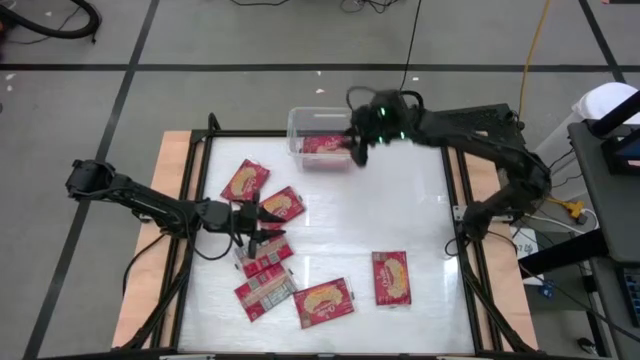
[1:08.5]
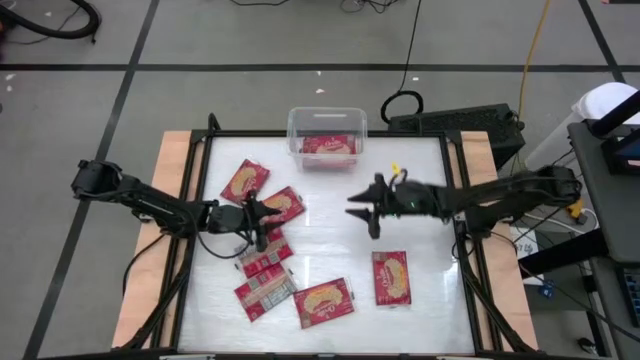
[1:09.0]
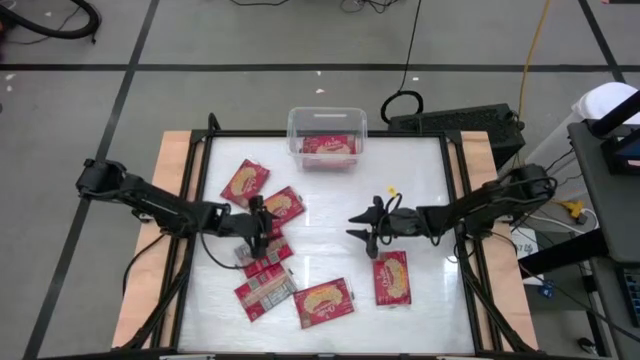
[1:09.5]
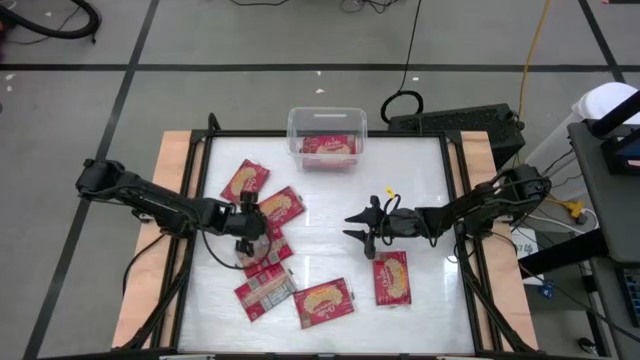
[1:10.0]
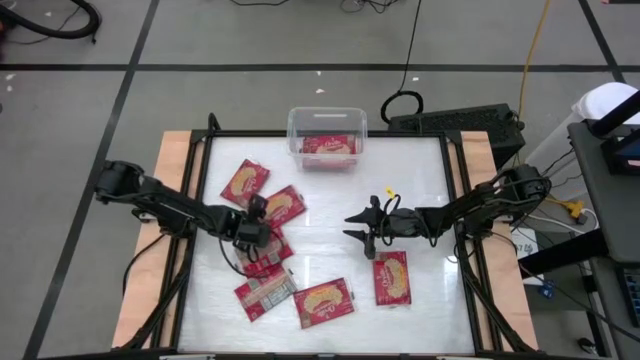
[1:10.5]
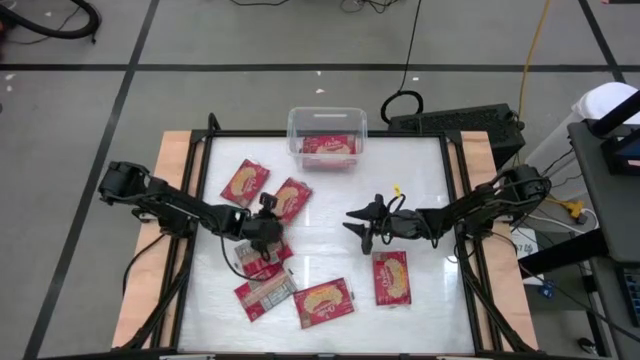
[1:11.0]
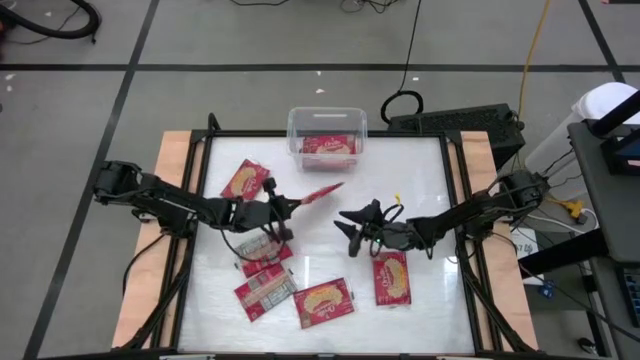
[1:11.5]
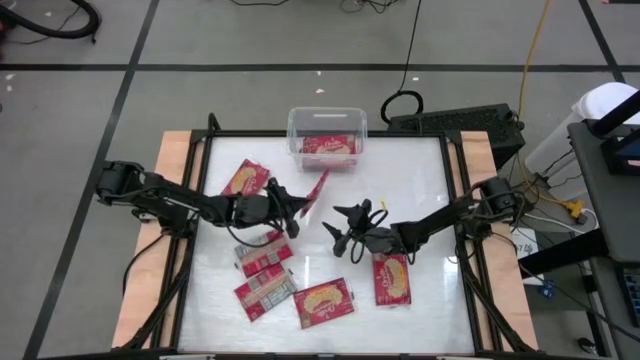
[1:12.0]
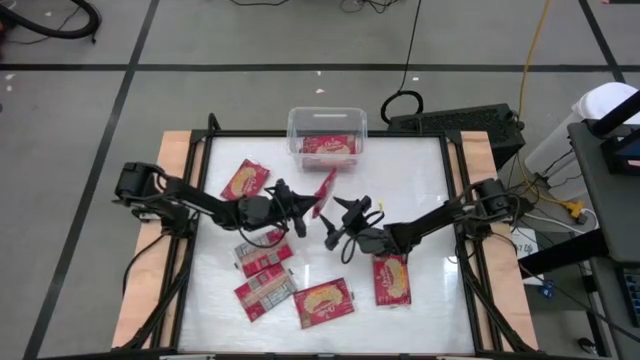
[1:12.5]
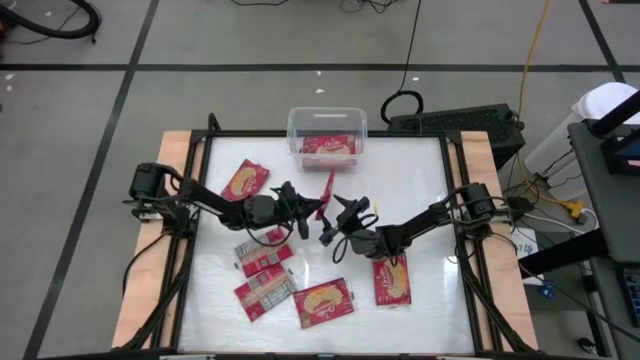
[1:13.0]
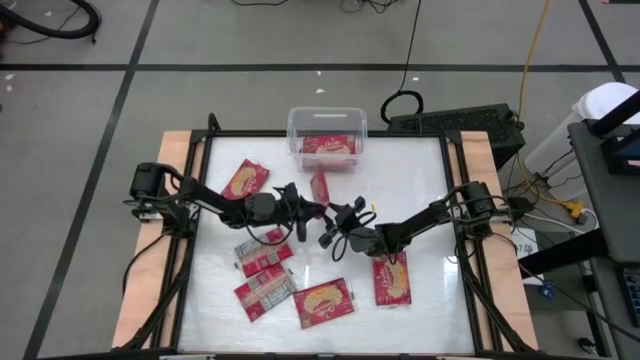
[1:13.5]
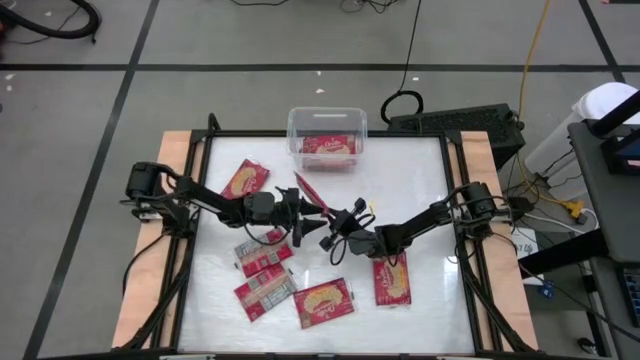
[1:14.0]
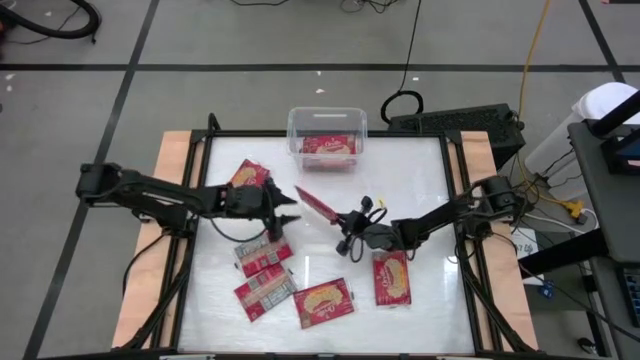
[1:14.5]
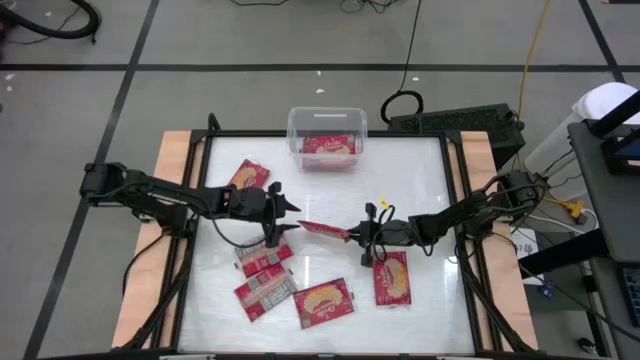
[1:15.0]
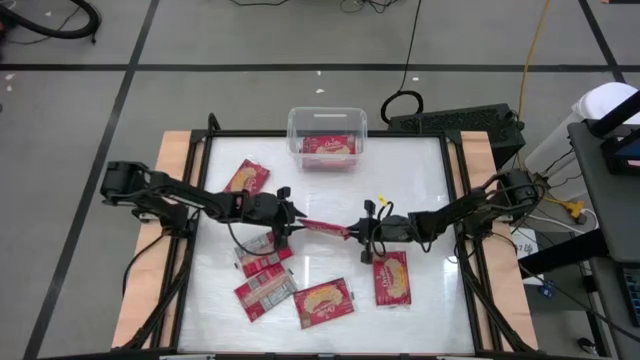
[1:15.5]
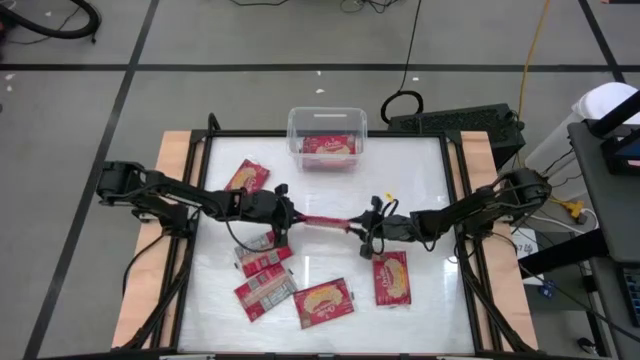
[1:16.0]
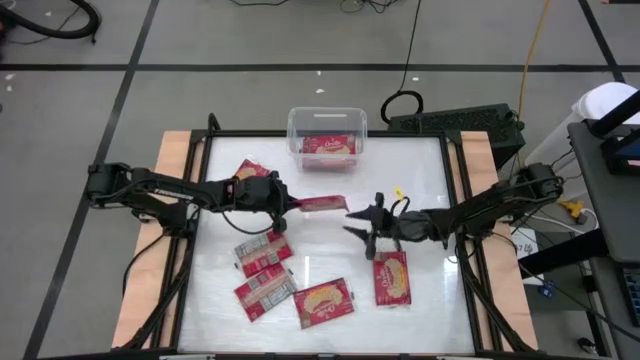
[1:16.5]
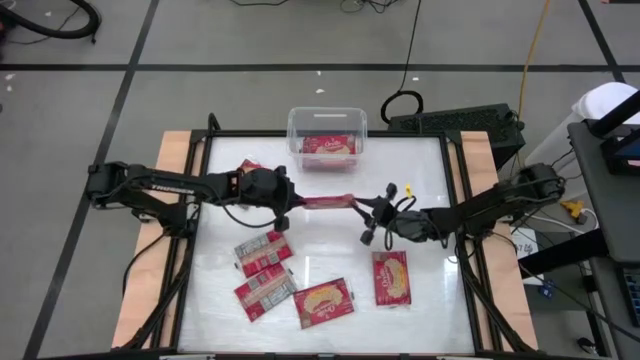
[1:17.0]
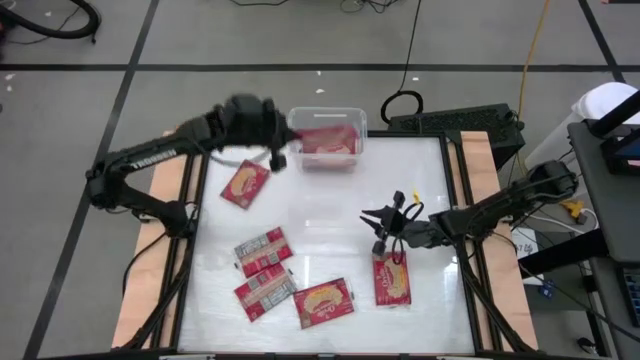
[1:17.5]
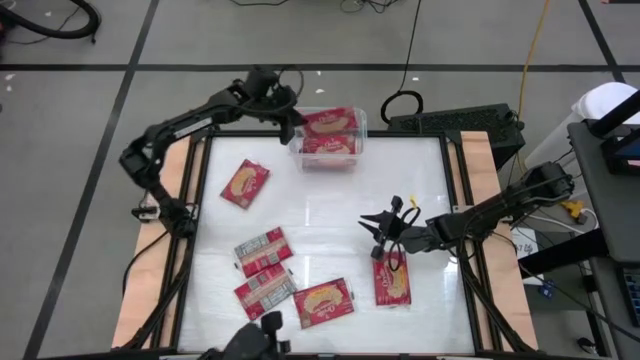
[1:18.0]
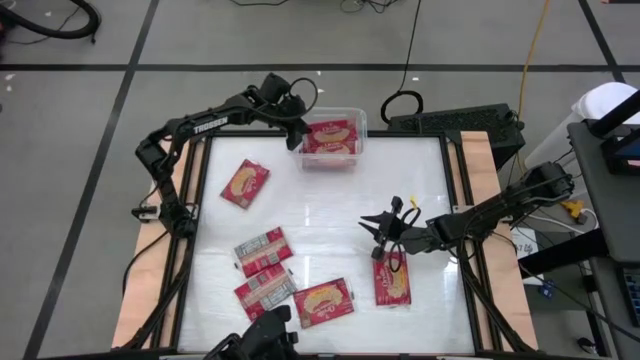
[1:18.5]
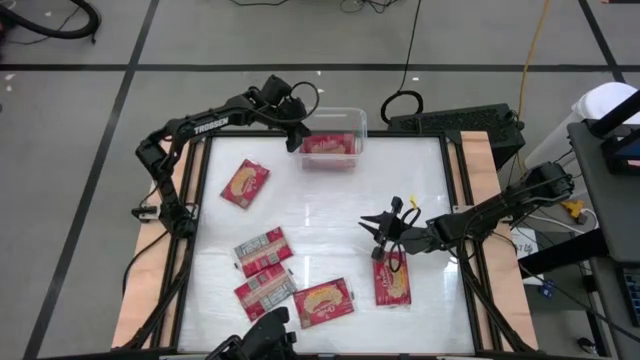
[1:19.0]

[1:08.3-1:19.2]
Task: Sort popcorn bags into baskets
Put the popcorn bag into the transparent bin

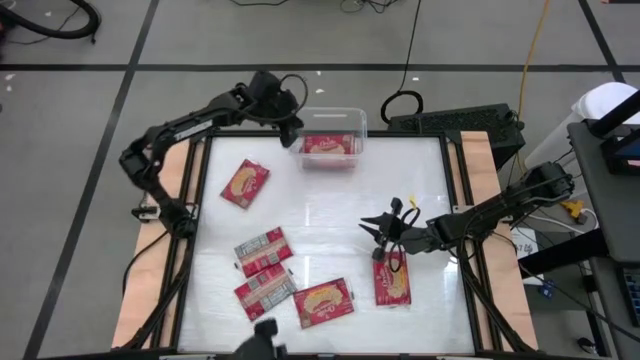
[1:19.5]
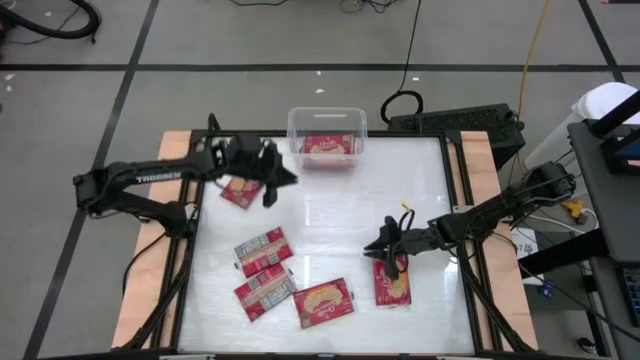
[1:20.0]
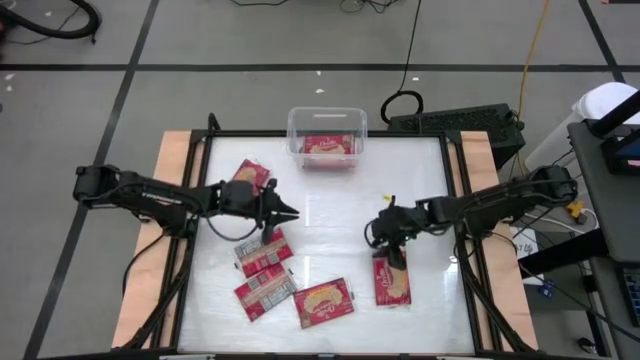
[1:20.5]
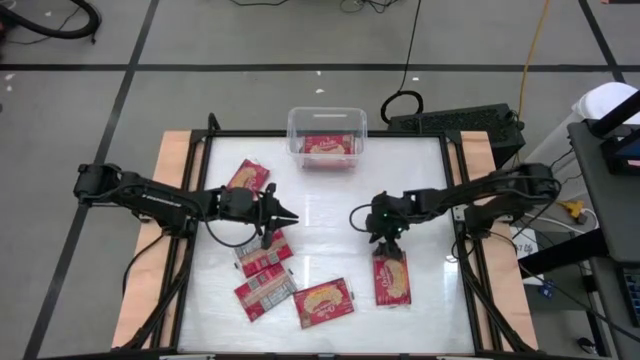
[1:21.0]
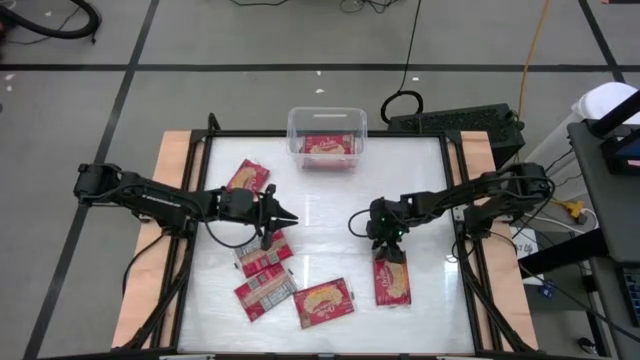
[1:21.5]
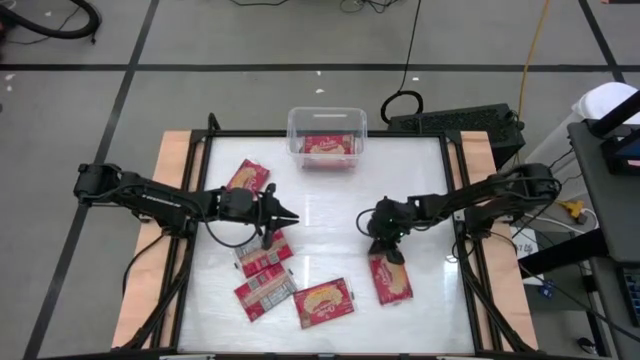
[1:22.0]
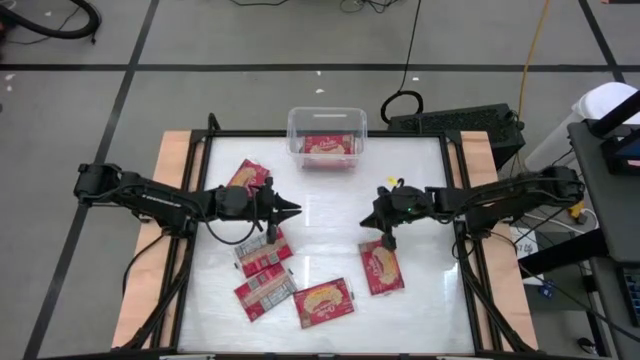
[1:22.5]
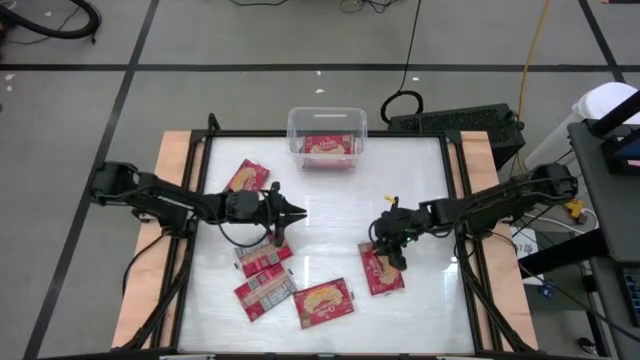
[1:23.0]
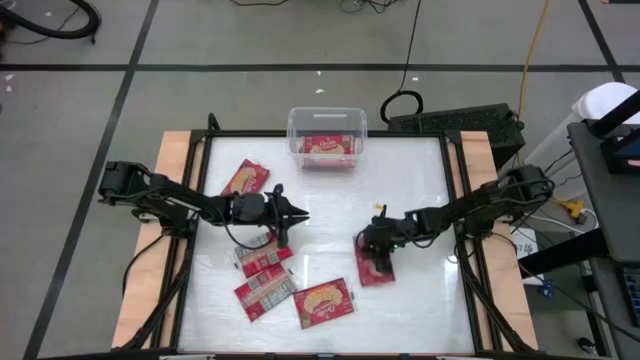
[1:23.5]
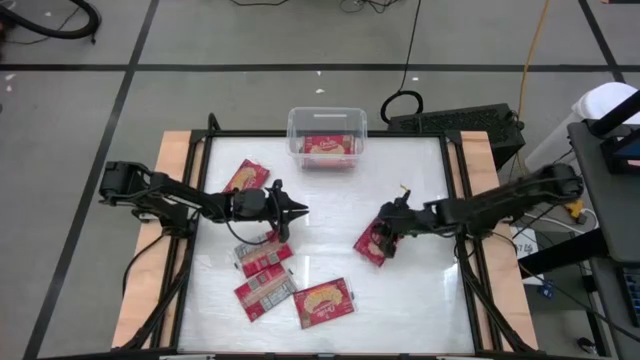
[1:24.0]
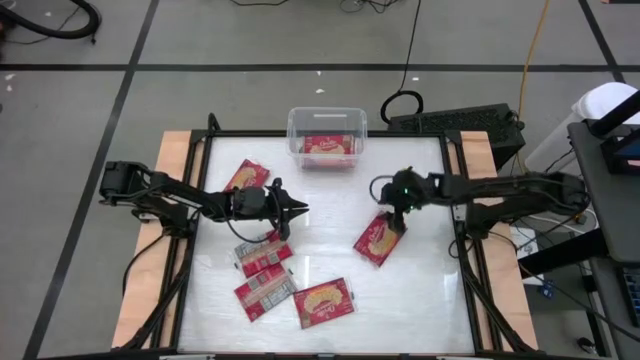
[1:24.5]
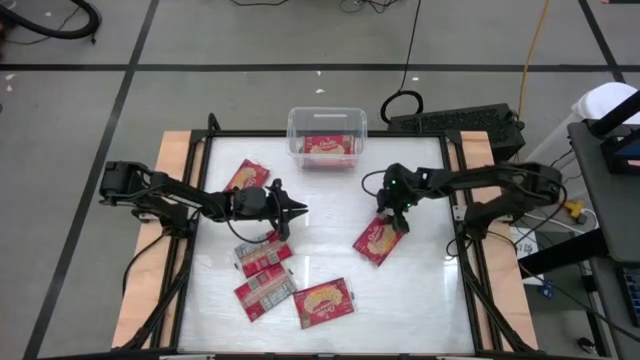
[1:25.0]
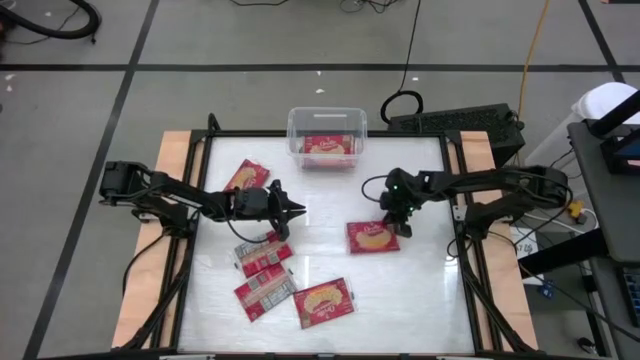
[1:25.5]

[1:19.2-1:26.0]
Put the popcorn bag into the transparent bin

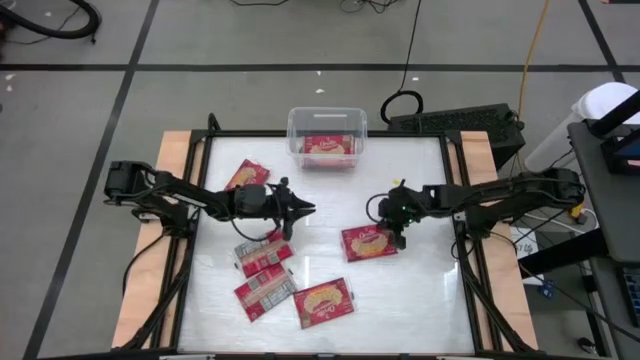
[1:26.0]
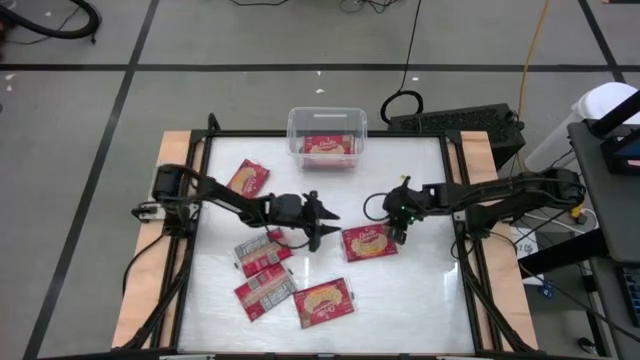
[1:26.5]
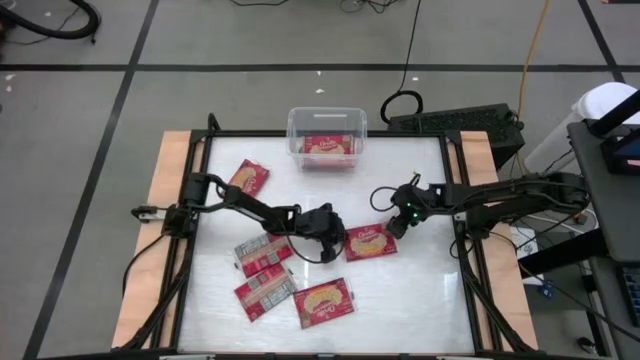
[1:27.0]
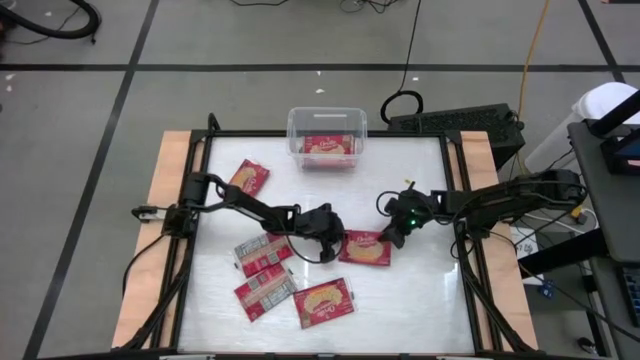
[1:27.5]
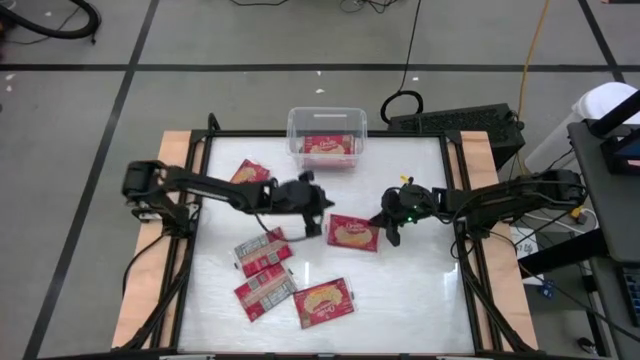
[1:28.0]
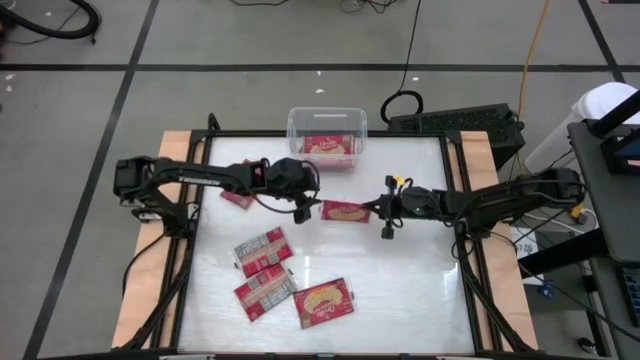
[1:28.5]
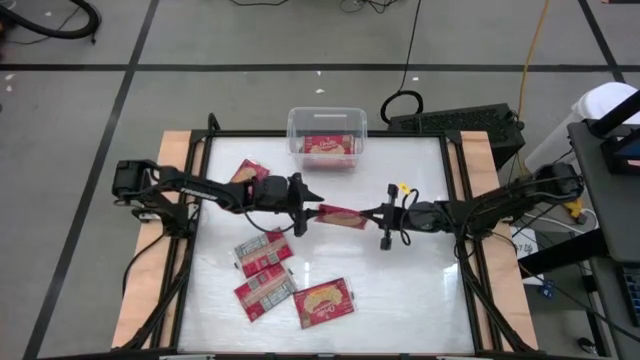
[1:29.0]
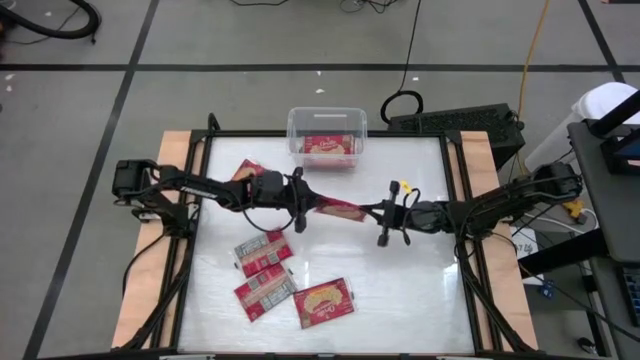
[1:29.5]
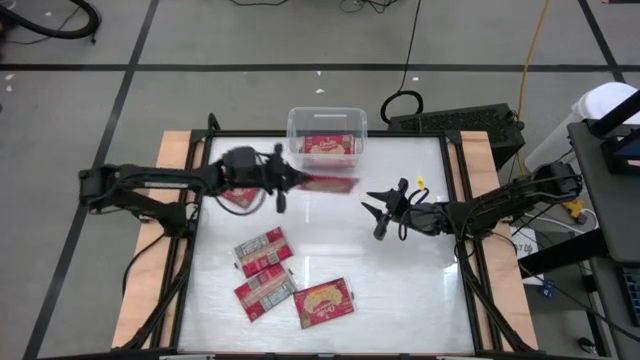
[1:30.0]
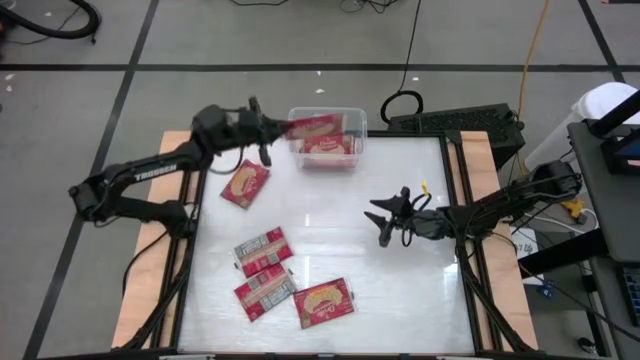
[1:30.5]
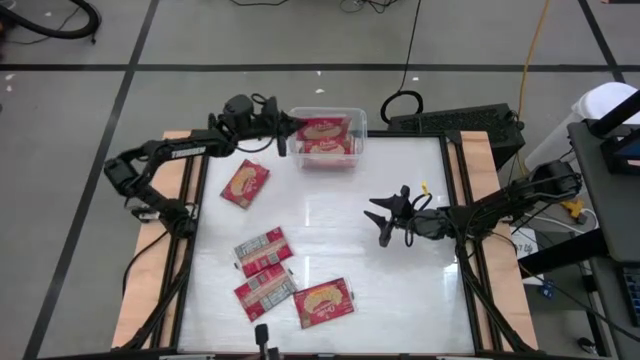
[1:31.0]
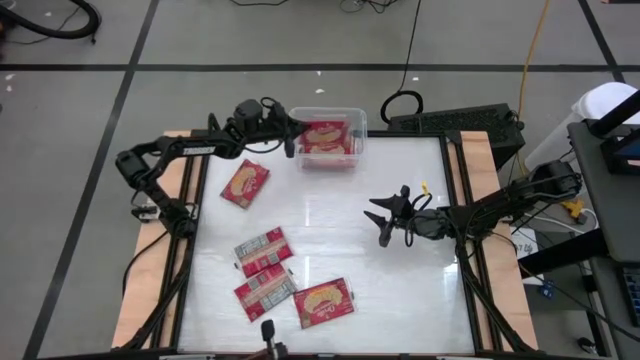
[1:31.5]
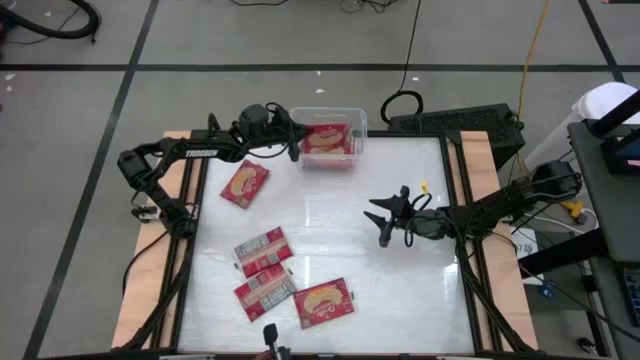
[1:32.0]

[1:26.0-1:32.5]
Put the popcorn bag into the transparent bin
